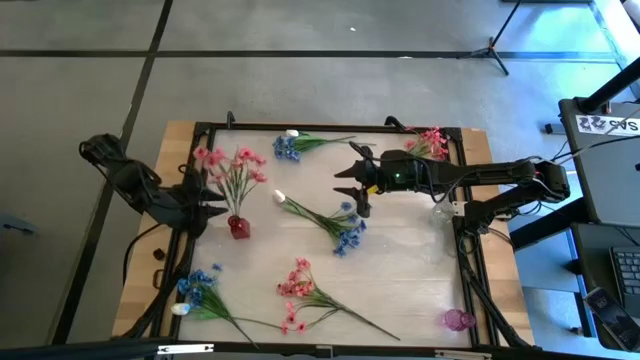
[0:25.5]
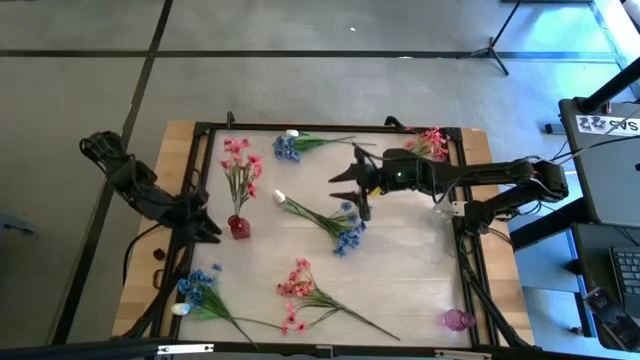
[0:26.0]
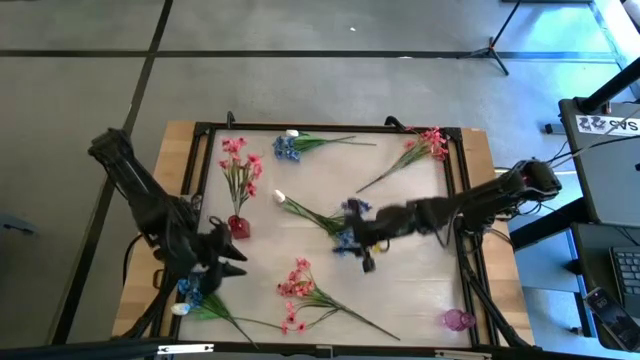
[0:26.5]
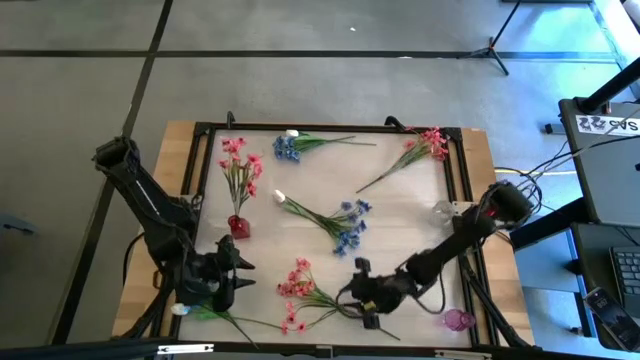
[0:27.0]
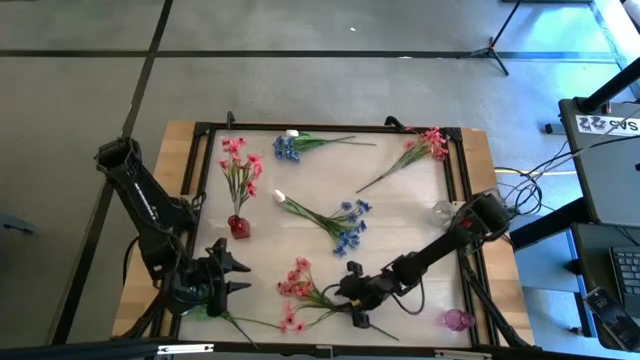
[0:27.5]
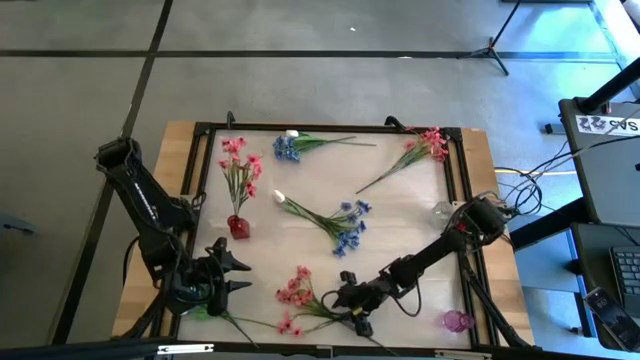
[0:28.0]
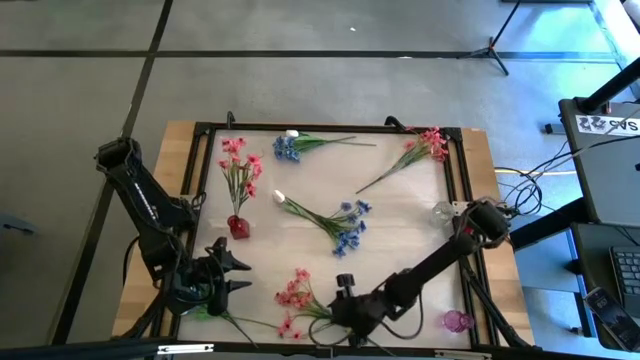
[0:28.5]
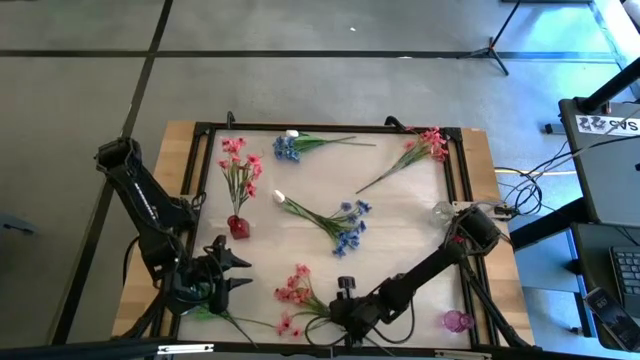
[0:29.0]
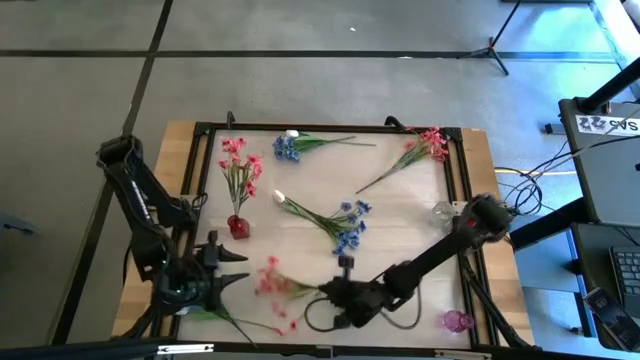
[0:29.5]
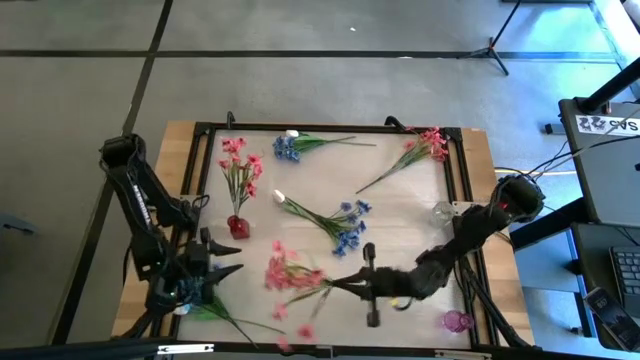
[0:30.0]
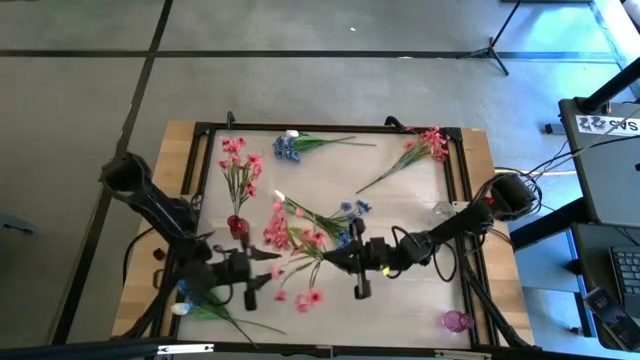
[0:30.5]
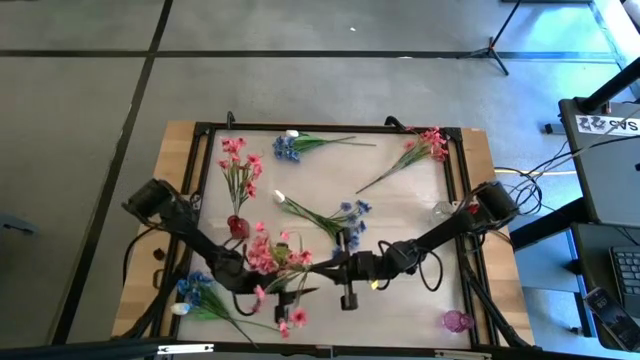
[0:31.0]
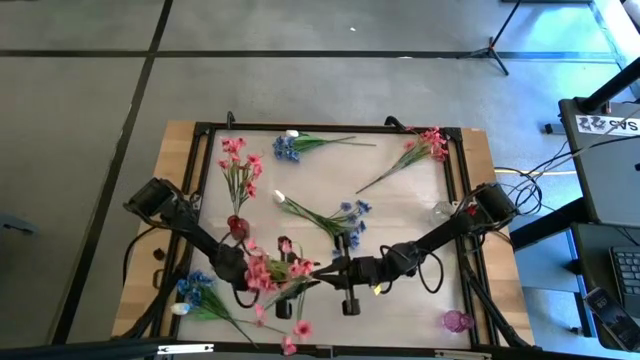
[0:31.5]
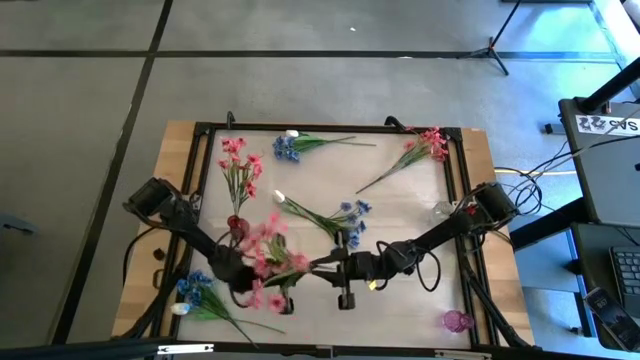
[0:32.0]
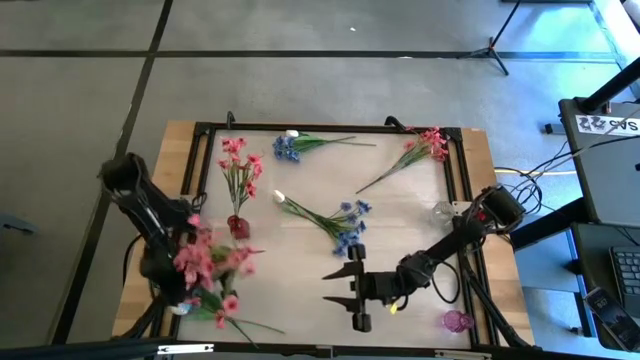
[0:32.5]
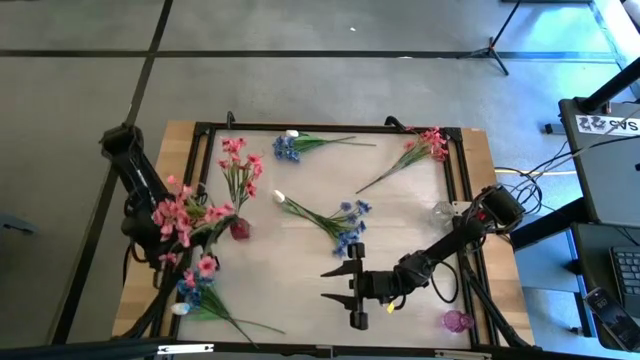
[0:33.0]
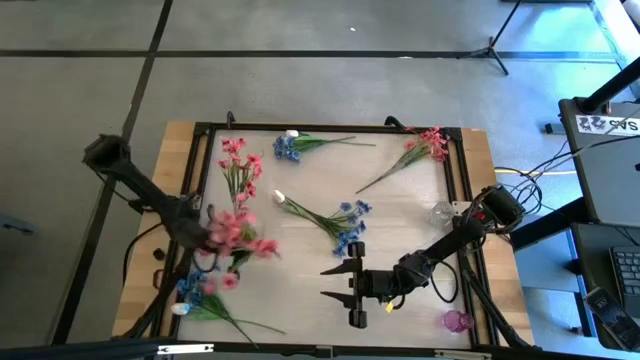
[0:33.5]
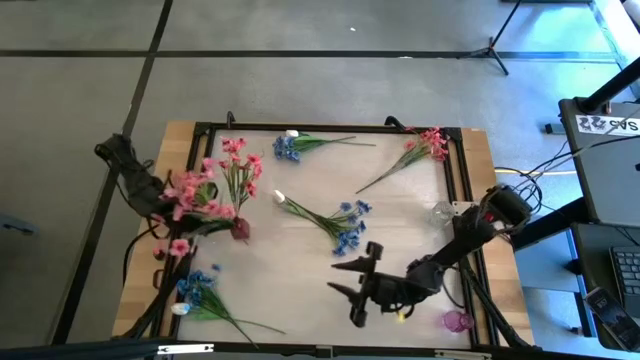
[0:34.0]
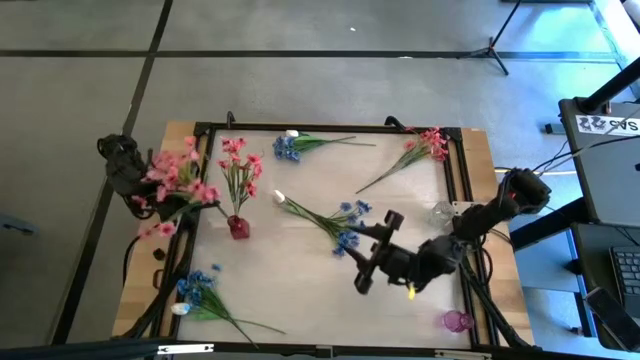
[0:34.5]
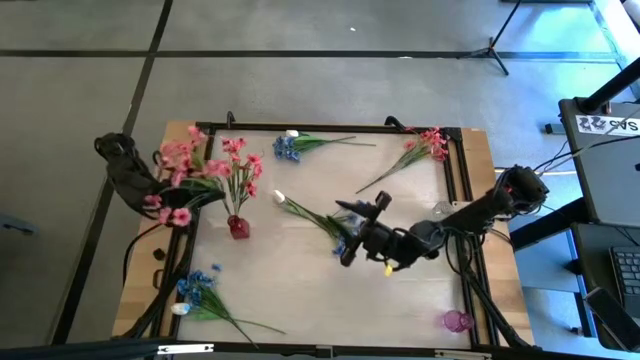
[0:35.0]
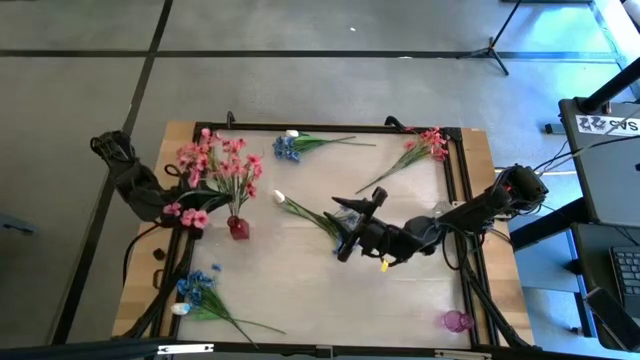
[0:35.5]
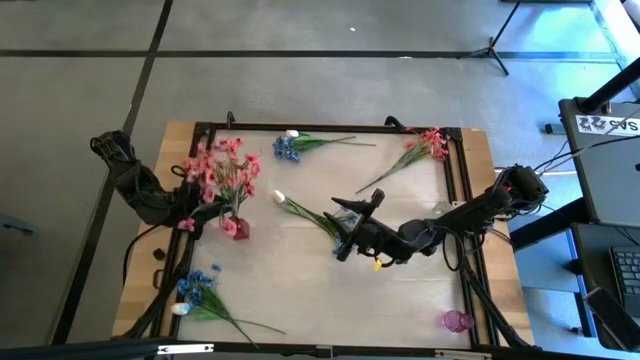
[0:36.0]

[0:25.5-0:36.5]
Task: Sort flowers into vase by color
Put the bottom pink flowers into the red vase

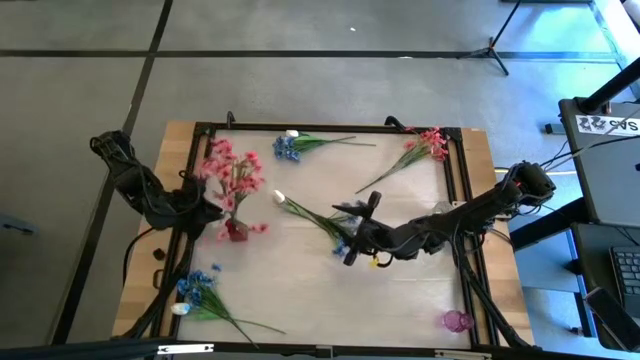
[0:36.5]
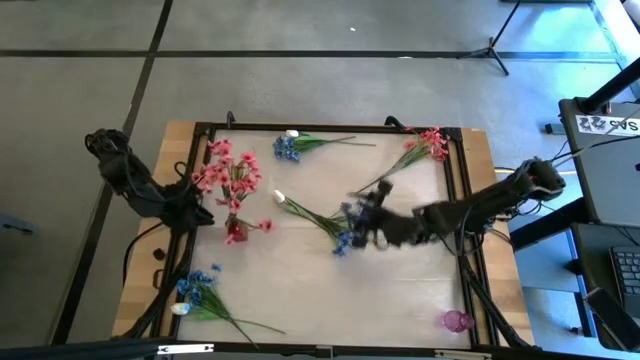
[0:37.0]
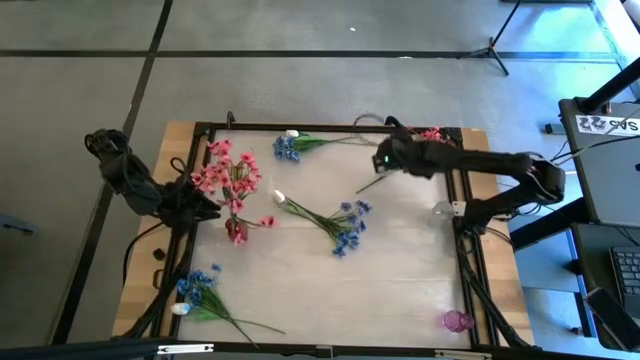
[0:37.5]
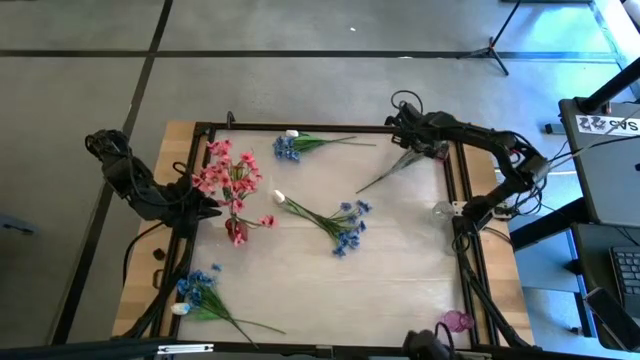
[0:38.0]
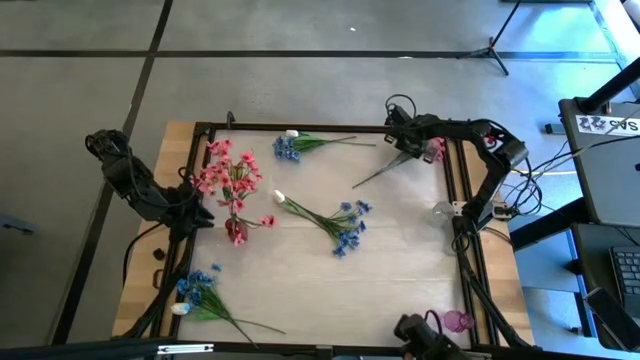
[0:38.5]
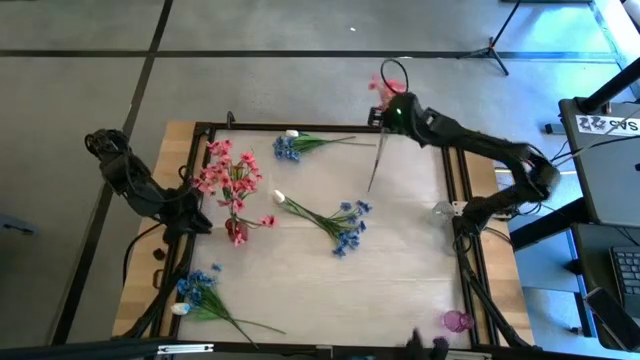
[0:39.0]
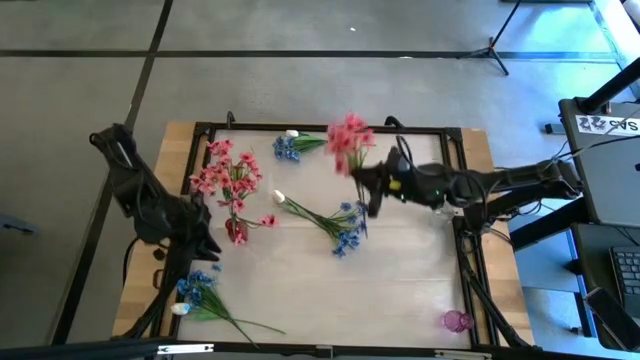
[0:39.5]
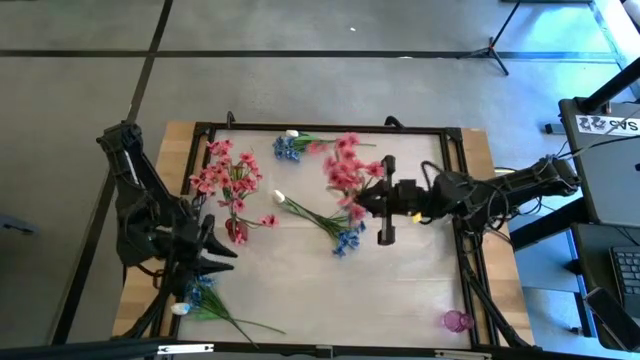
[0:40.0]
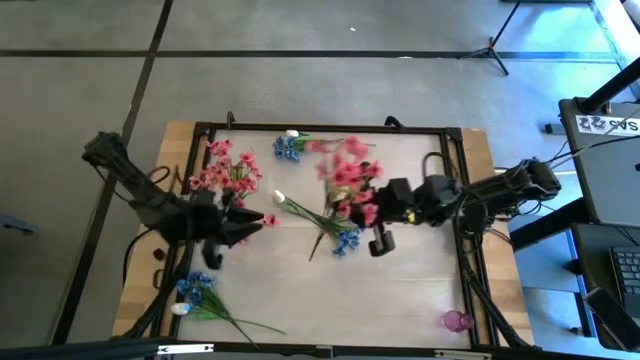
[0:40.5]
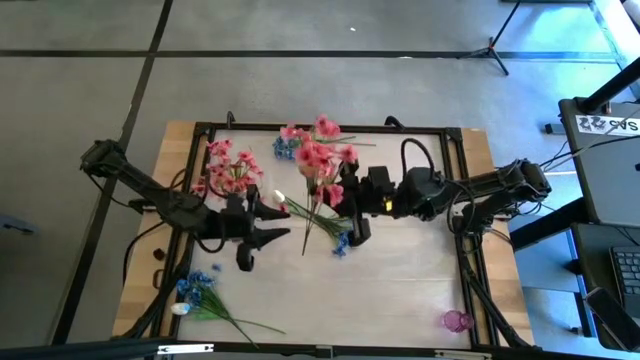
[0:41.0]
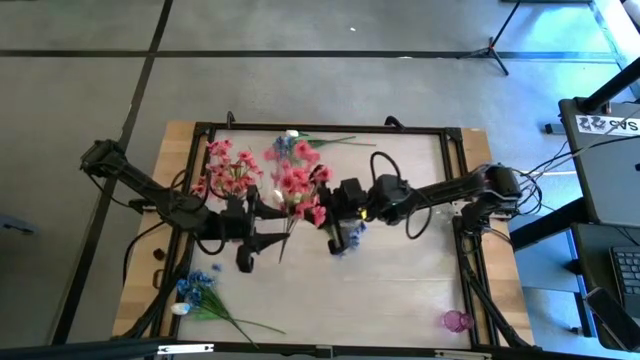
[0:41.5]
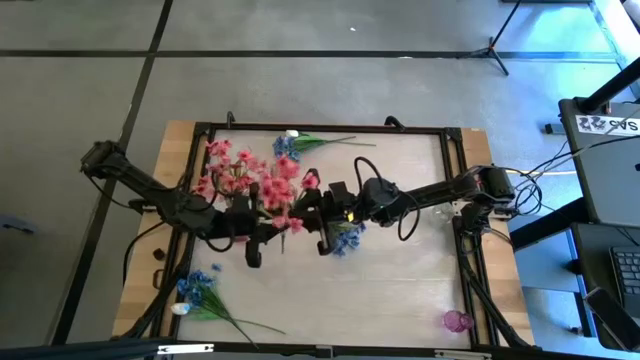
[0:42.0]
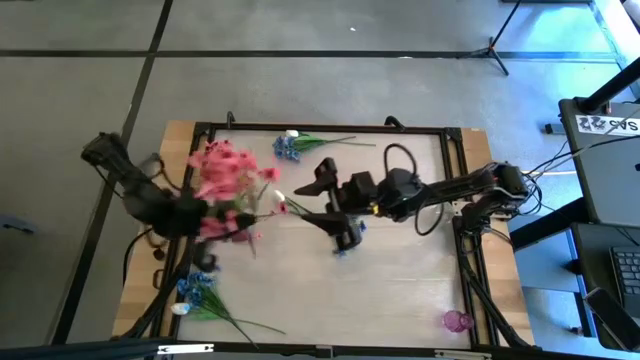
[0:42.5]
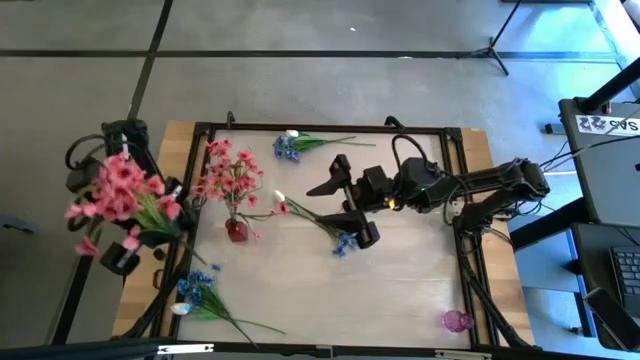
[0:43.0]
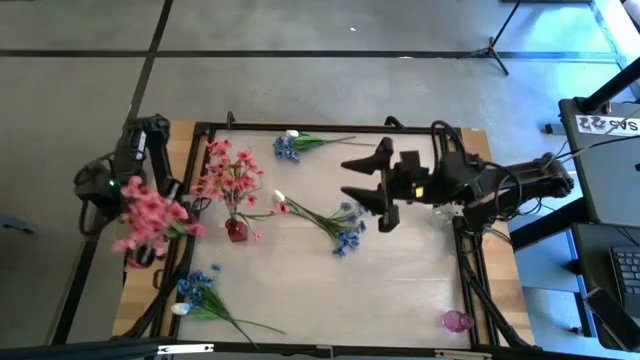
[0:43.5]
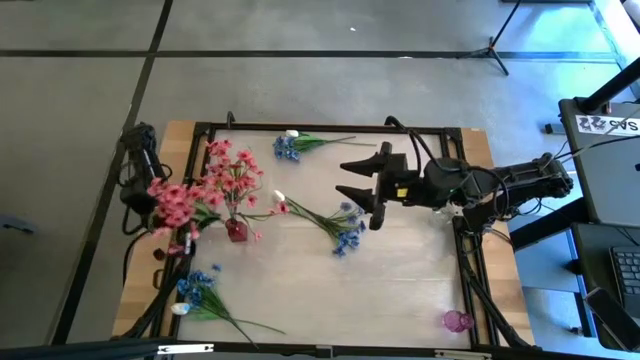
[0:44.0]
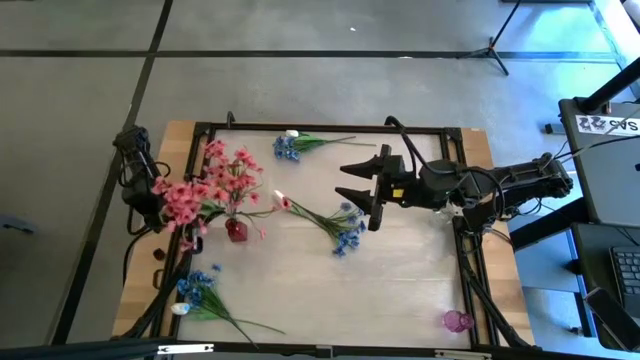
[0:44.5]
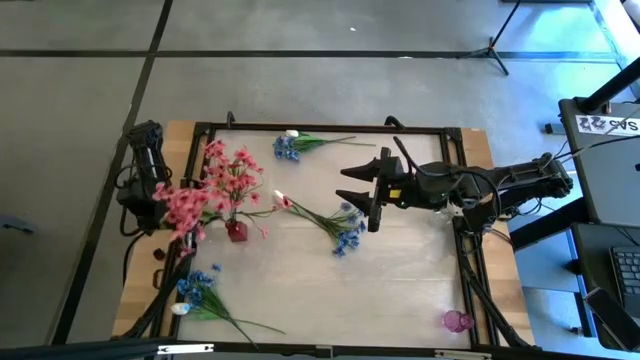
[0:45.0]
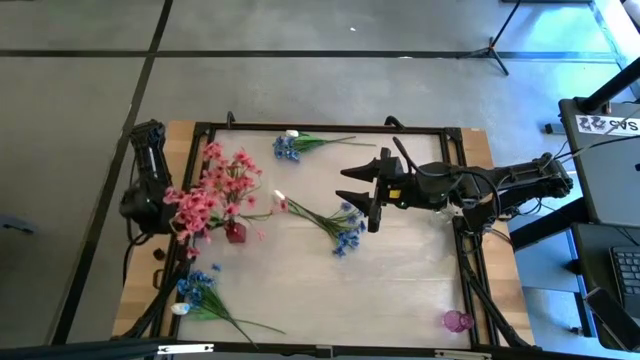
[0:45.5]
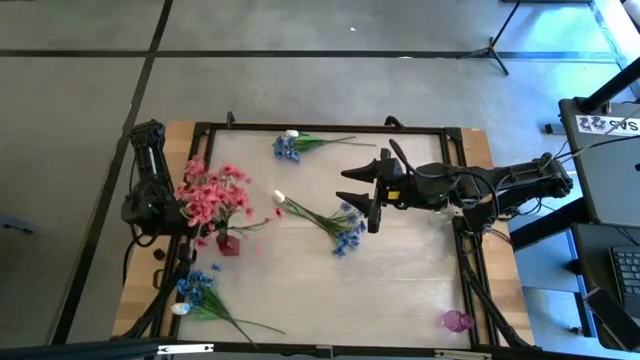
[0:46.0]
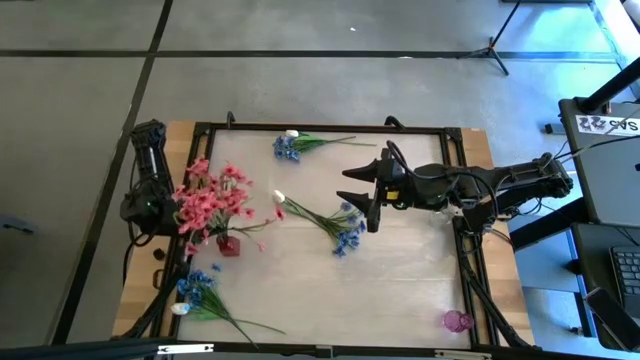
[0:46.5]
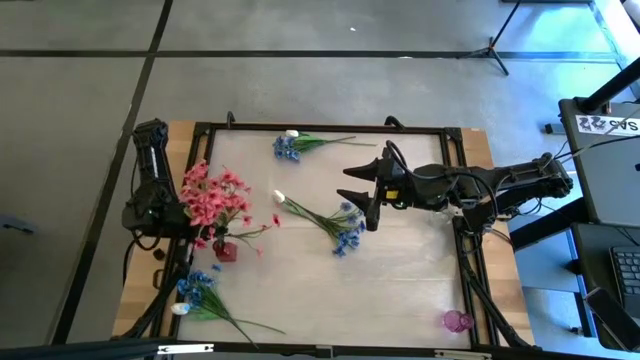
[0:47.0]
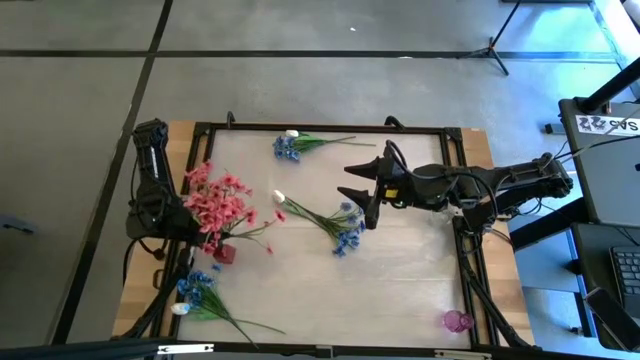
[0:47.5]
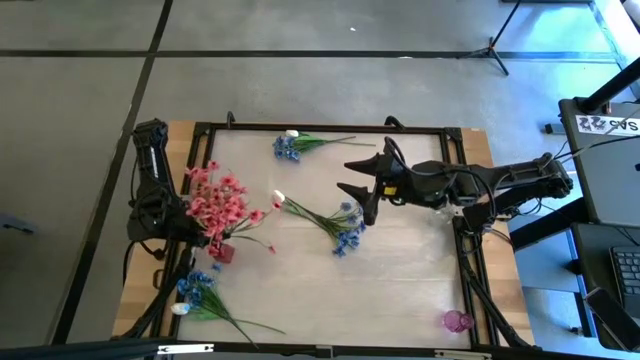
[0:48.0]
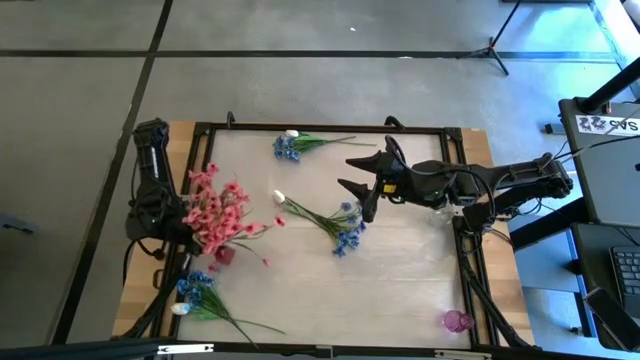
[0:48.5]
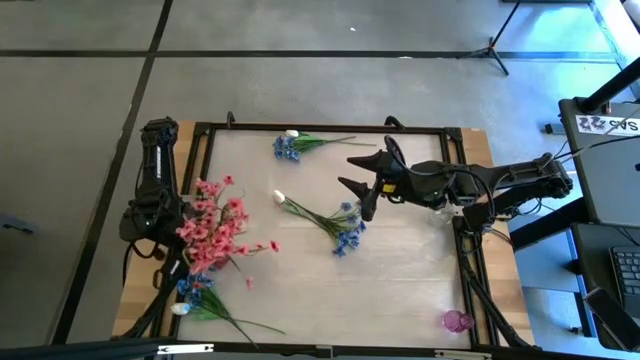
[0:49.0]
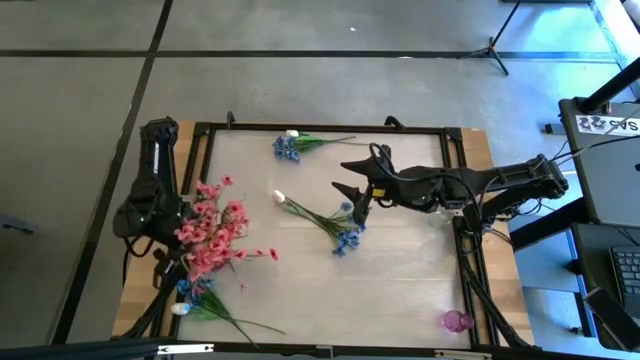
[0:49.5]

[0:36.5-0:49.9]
Put the pink flowers into the red vase
